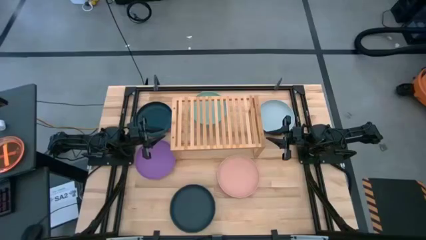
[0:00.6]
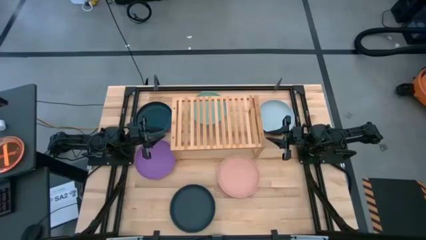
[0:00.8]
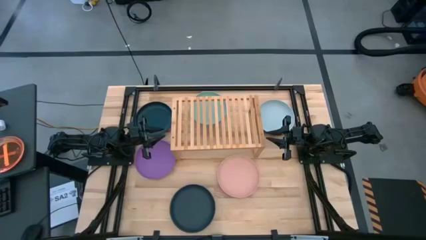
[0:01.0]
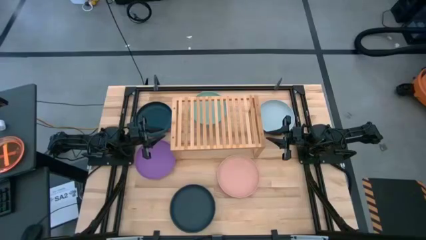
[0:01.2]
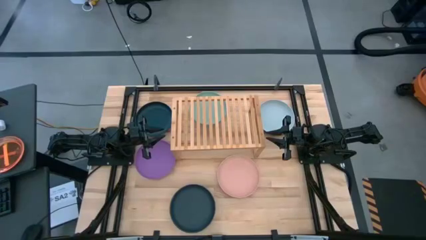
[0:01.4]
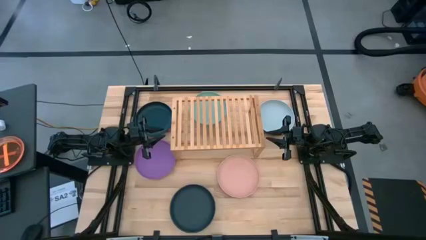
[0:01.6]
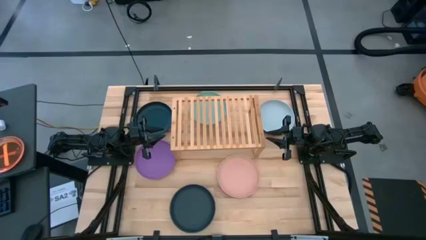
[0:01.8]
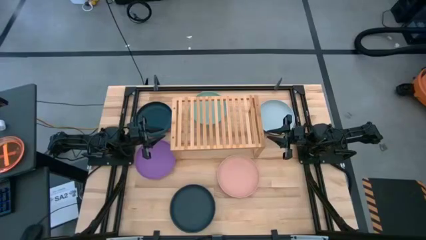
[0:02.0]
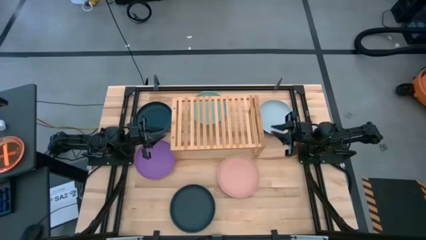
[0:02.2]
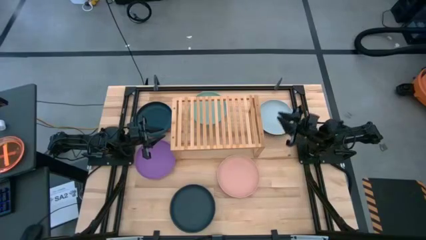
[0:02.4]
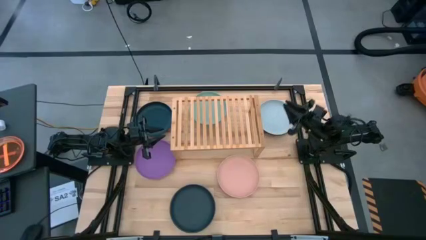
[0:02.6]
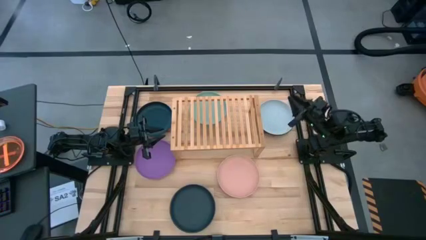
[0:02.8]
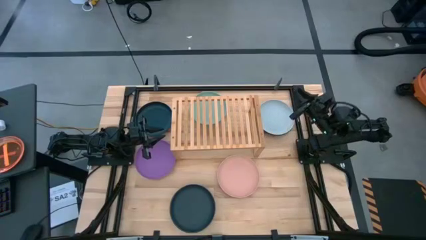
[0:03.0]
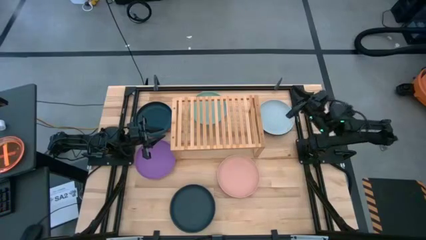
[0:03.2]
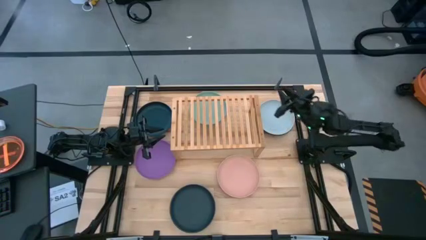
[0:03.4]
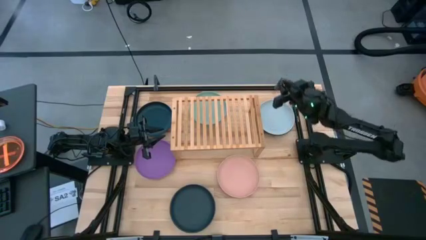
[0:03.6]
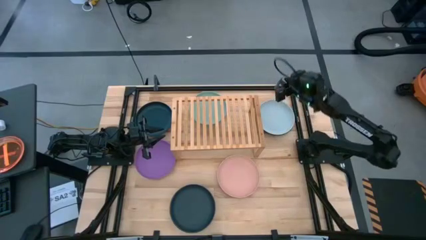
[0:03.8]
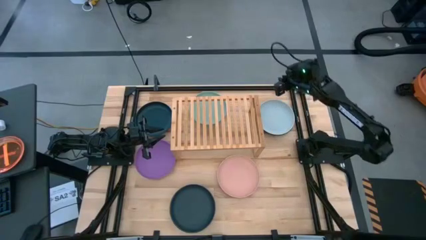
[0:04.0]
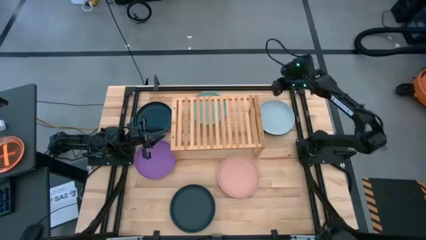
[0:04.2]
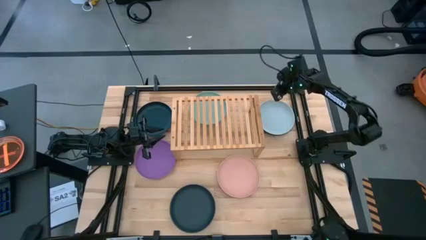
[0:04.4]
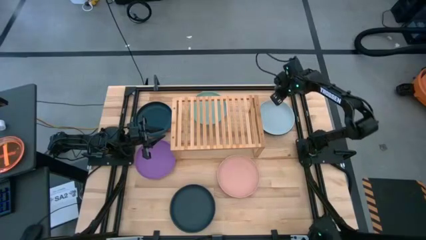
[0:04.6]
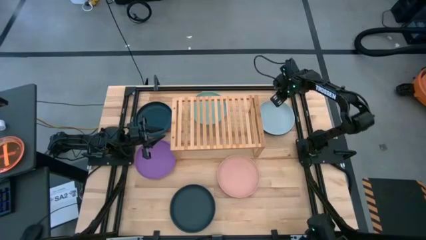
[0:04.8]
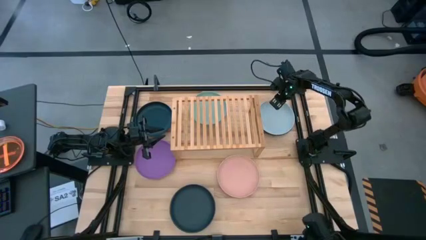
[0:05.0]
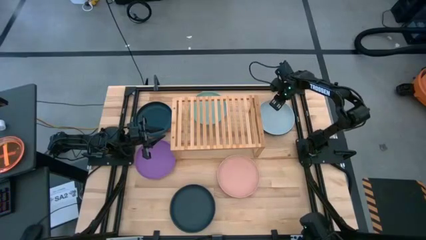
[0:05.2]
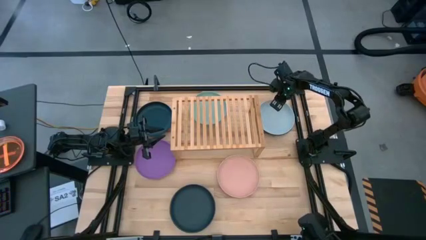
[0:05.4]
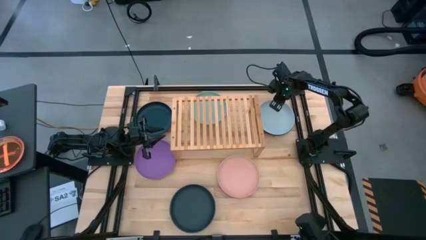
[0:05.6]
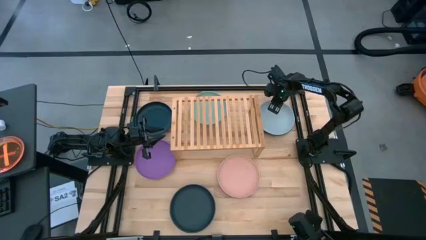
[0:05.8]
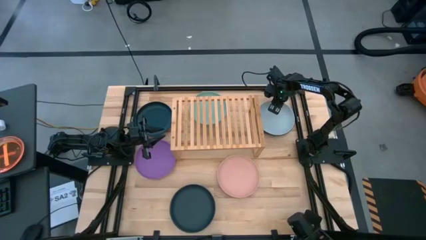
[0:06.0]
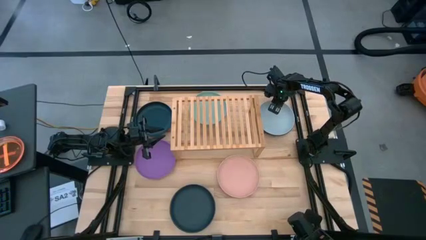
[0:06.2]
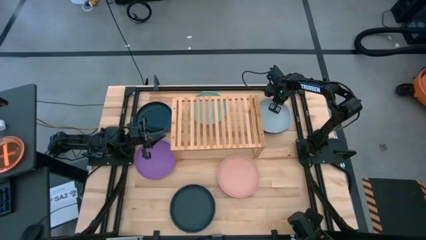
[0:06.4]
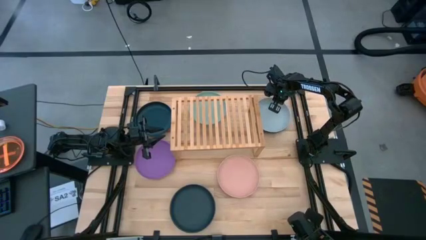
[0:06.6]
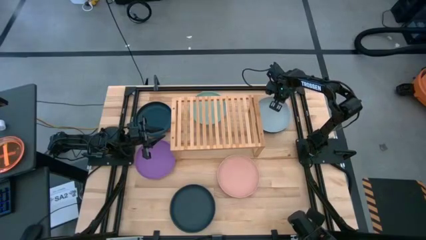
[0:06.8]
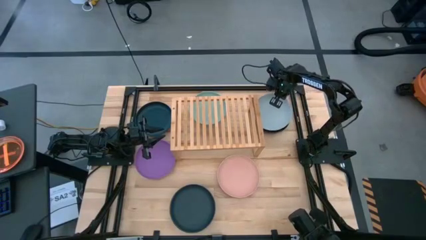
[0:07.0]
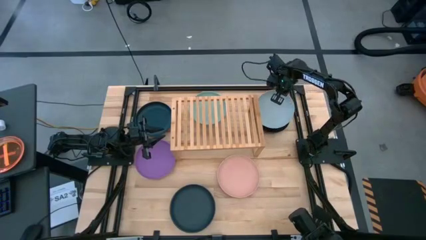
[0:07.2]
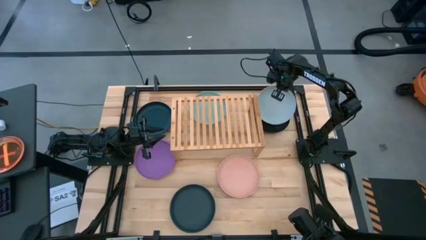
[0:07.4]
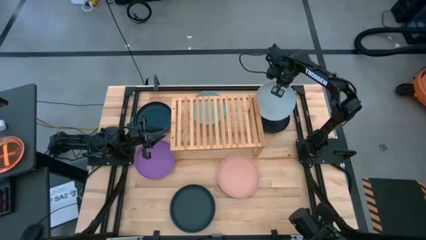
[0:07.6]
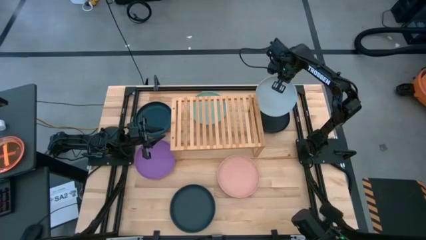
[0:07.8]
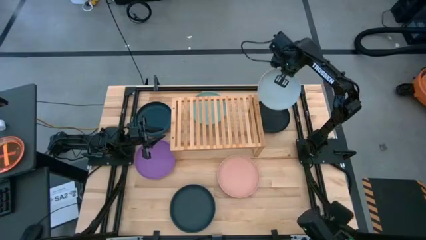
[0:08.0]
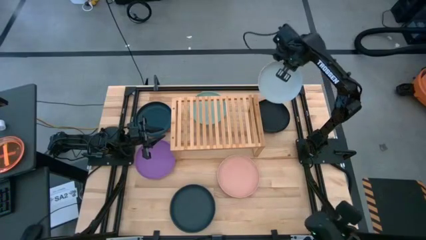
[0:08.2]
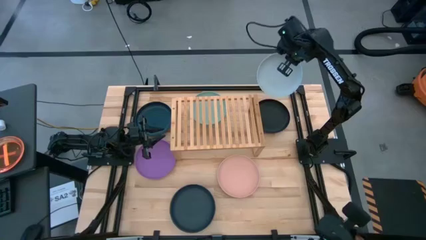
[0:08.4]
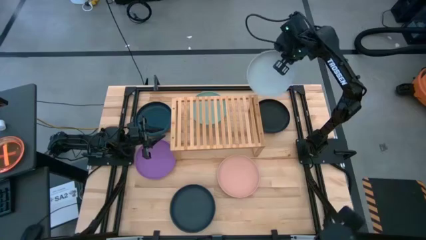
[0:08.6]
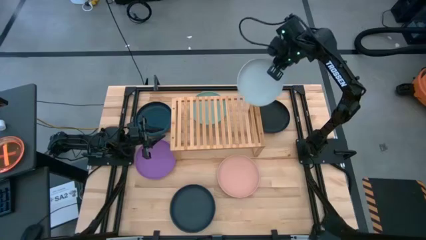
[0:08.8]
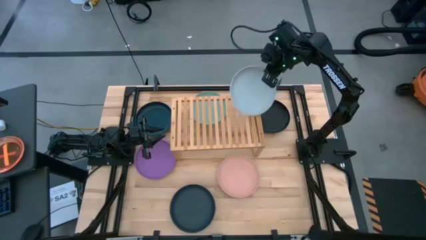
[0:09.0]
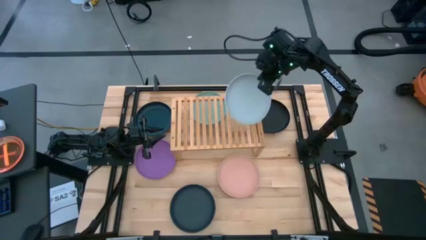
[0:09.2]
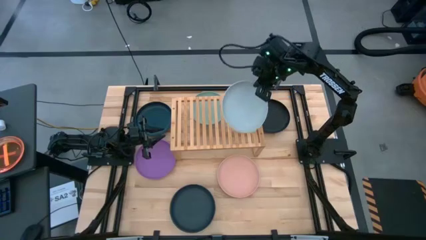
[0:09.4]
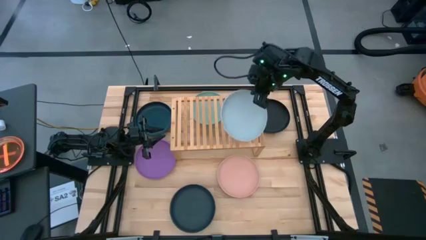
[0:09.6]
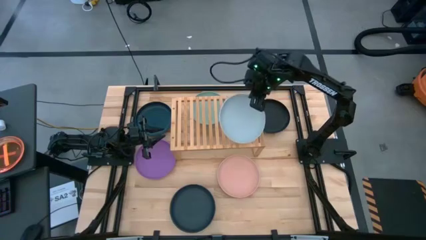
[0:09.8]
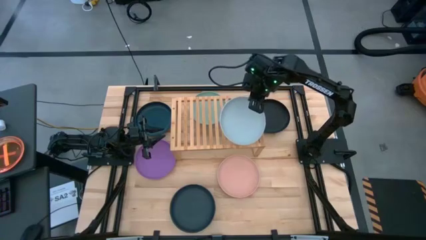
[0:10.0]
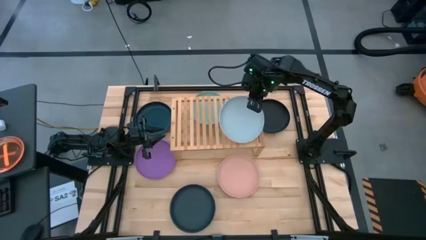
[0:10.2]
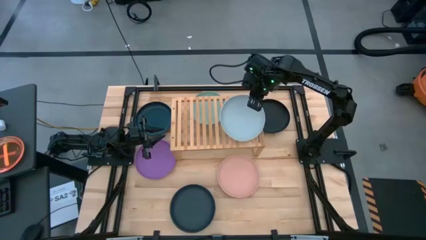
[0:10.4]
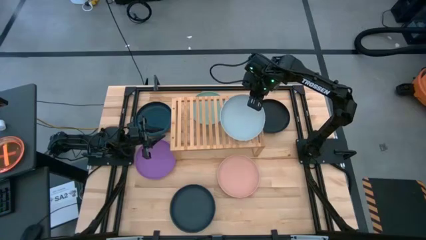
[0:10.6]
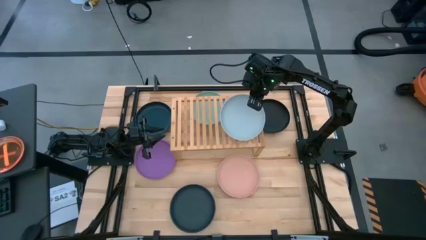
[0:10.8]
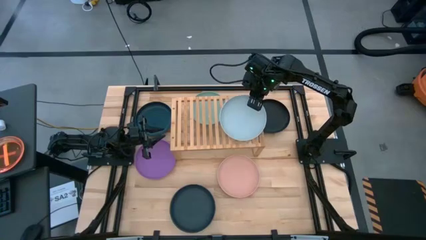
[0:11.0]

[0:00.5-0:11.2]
Task: Place and stack plates onto a shelf
Put the light blue plate on the shelf
